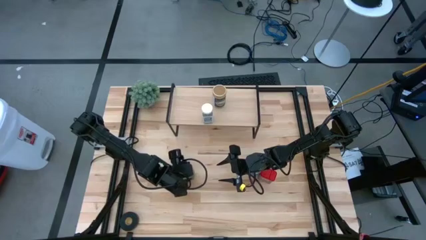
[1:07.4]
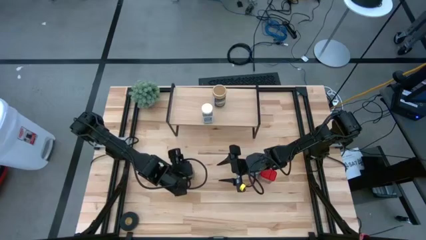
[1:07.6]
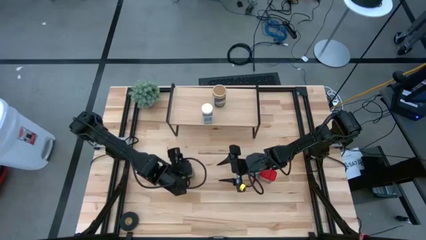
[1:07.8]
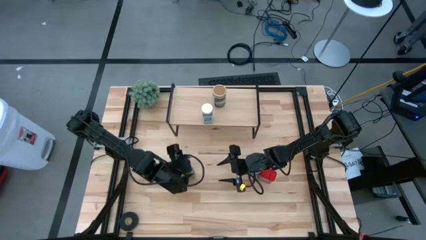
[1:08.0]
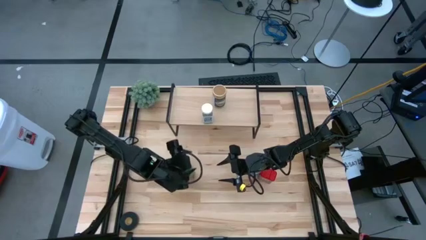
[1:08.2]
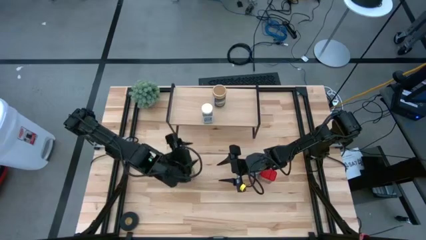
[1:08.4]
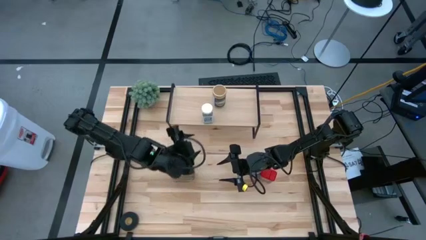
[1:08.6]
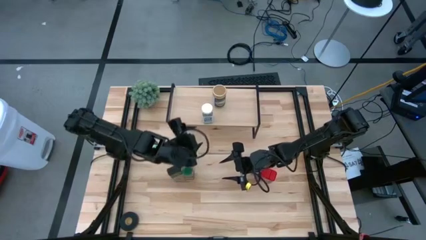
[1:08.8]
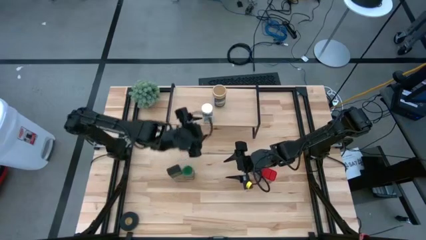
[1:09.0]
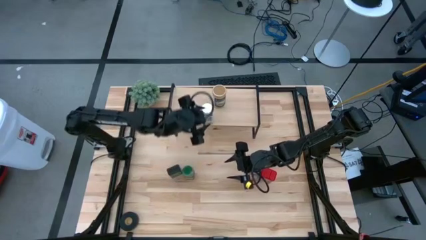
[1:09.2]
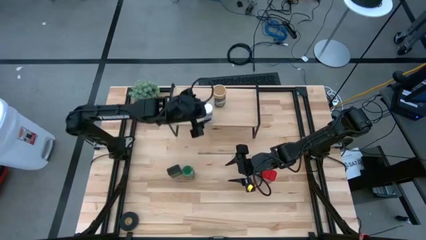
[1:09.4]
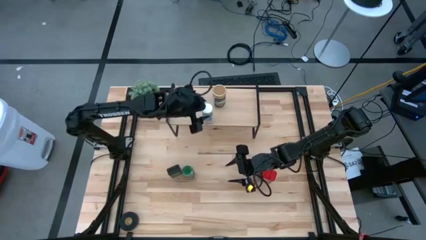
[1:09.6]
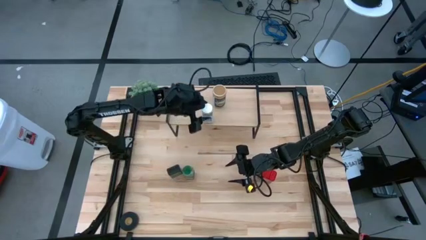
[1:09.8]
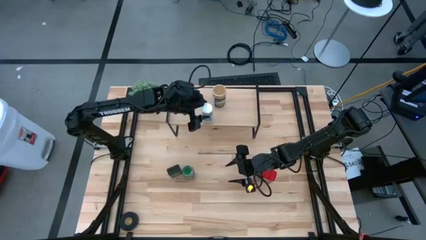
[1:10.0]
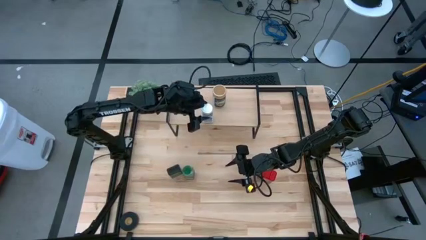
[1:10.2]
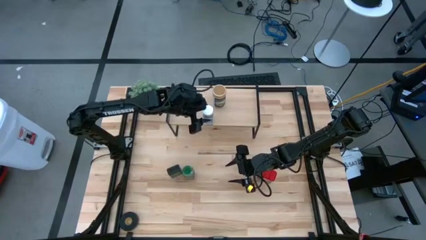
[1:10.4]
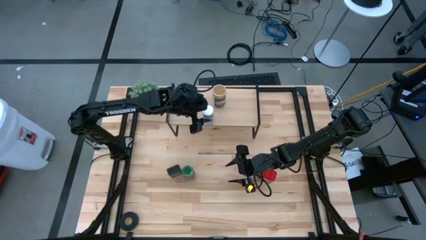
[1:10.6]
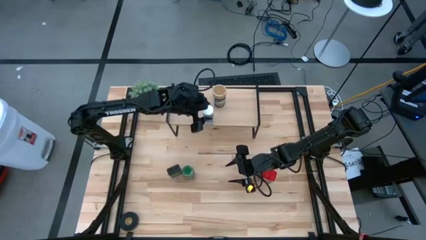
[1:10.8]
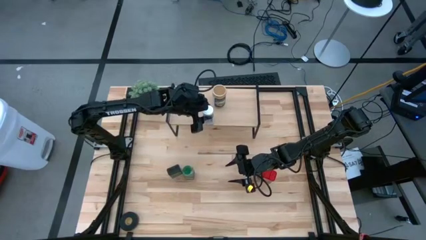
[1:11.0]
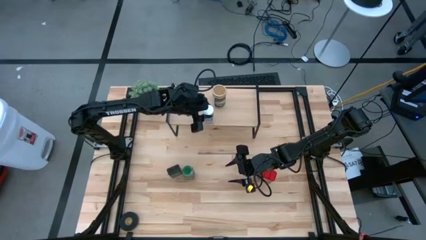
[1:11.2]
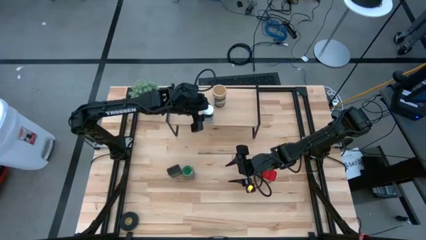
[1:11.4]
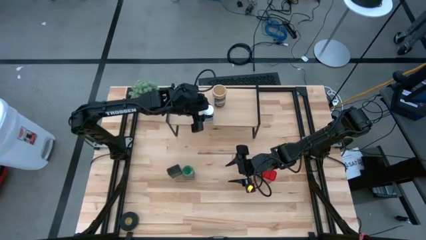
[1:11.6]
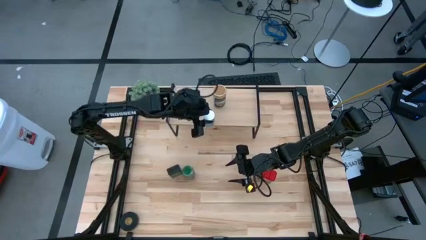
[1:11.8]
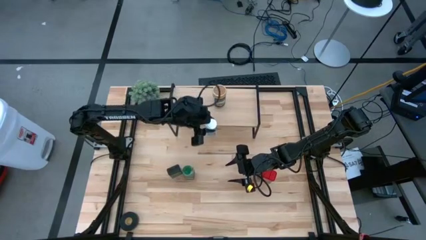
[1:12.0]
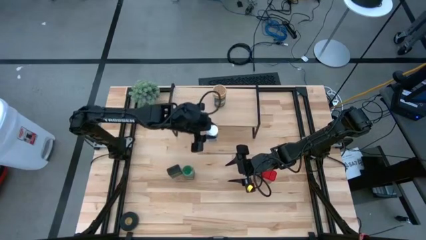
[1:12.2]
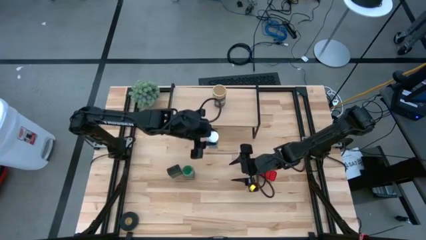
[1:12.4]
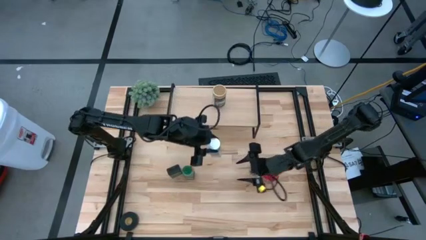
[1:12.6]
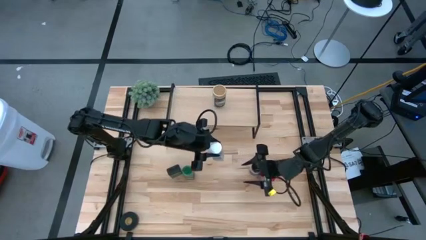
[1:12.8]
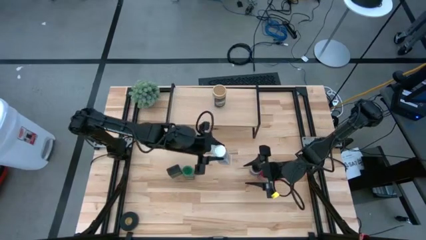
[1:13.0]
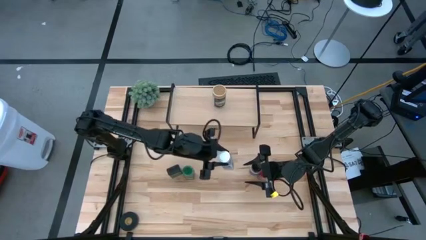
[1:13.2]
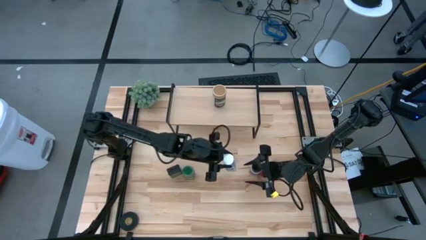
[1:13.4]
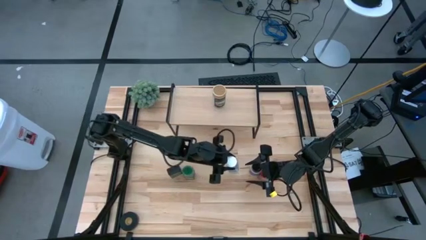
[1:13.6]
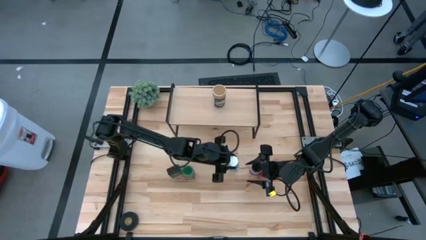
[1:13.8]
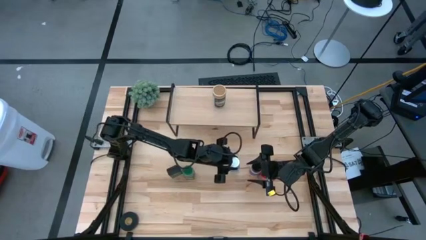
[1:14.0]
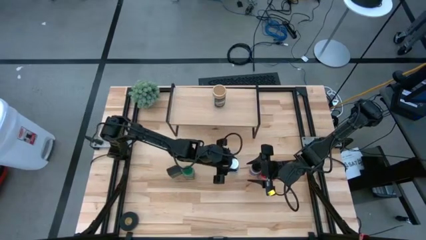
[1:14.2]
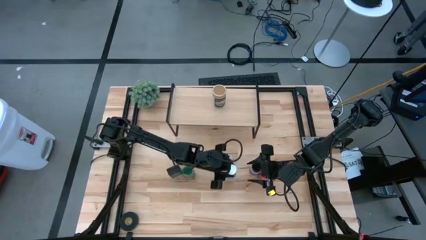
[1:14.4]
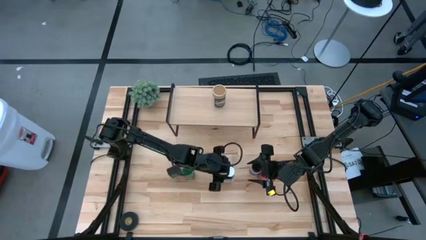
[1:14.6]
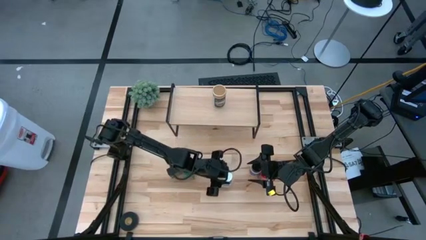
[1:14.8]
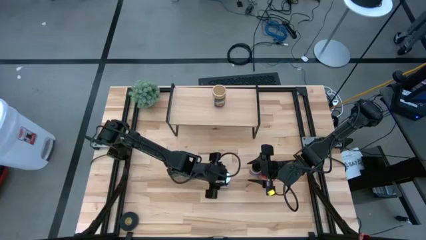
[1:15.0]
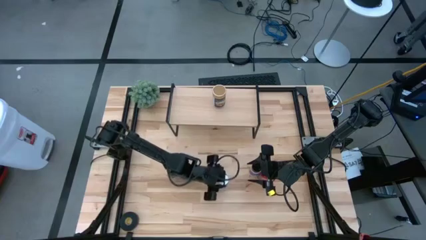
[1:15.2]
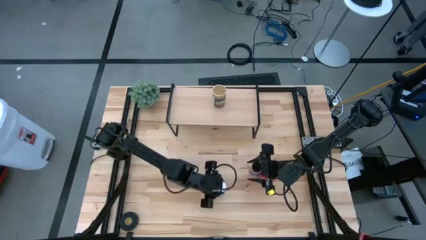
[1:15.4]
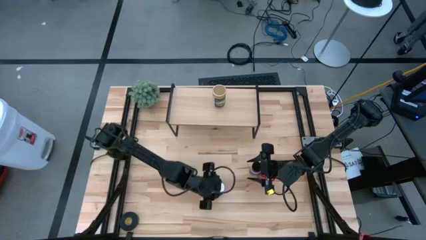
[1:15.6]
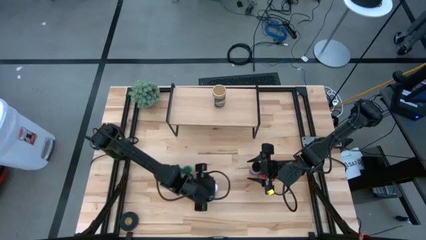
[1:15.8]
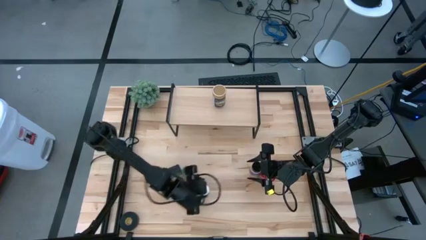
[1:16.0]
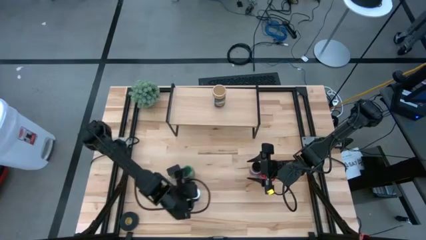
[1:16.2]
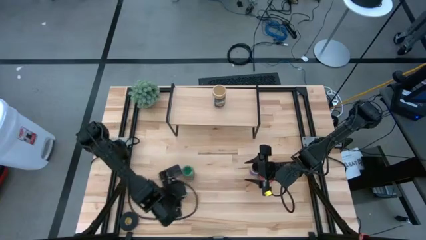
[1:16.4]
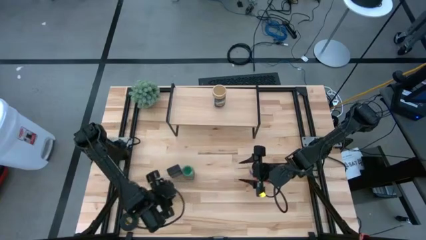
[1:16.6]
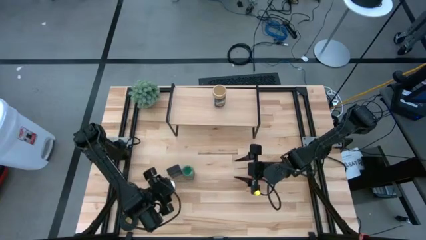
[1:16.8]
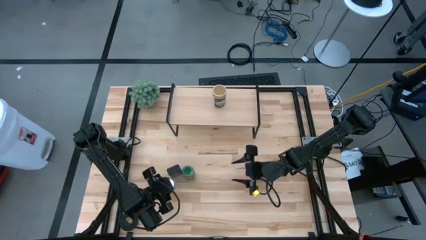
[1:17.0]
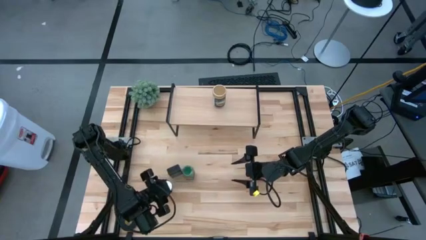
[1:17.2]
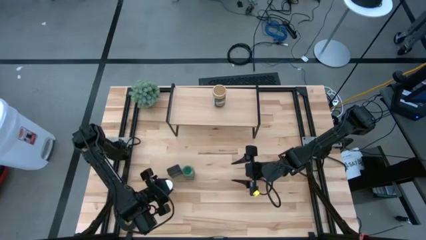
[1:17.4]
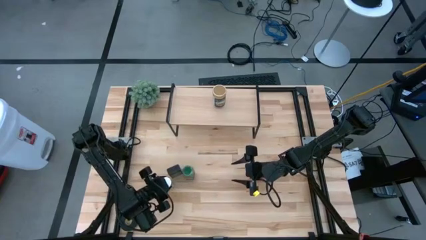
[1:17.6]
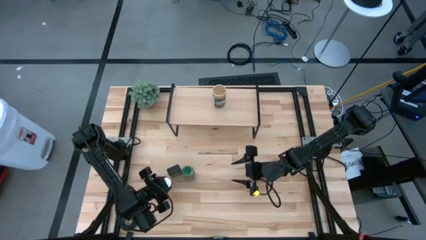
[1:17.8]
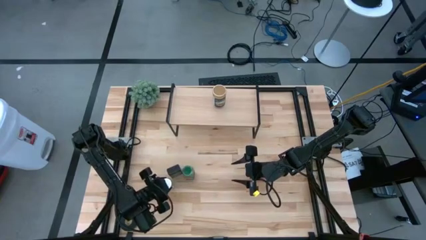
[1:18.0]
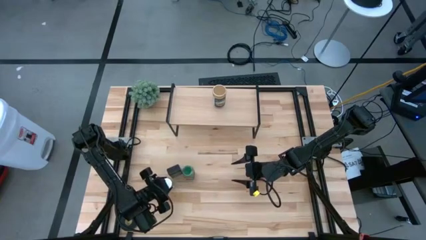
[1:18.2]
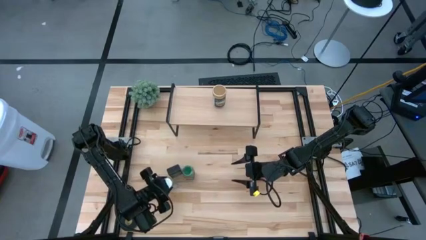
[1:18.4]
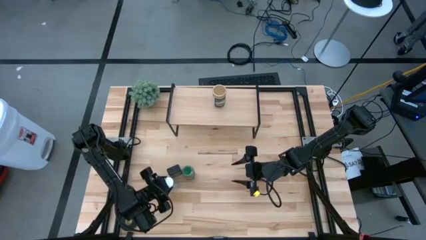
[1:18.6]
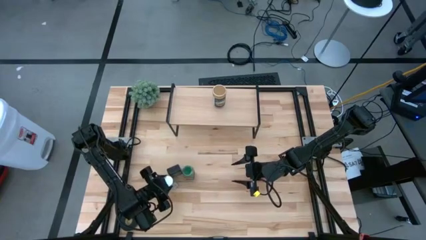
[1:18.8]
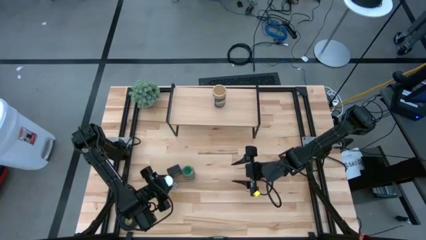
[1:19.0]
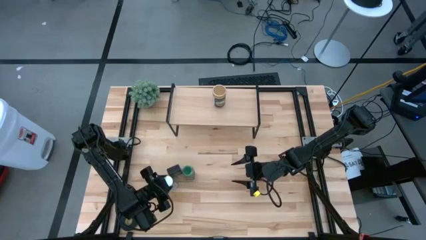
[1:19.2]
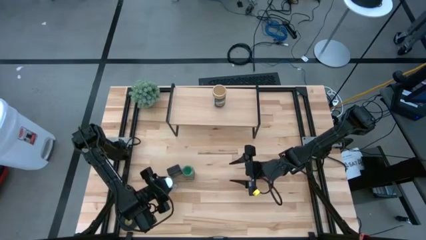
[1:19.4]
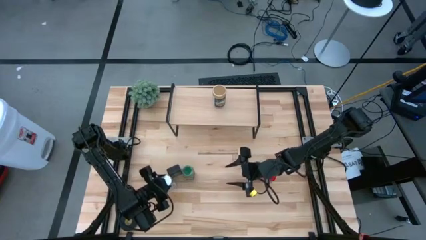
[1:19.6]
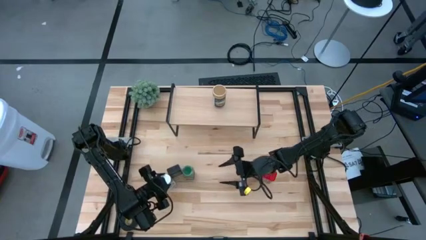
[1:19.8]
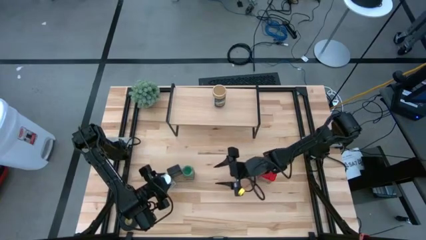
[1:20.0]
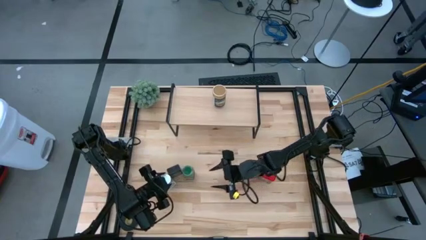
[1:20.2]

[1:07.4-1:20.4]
Task: Shelf spices
Remove the white seasoning bottle from the shelf

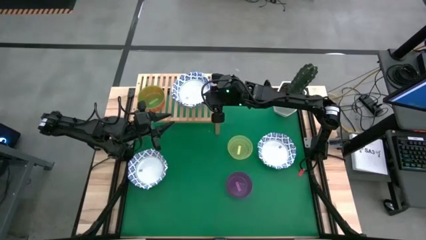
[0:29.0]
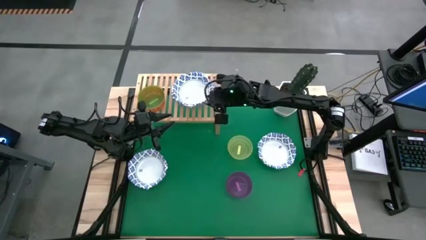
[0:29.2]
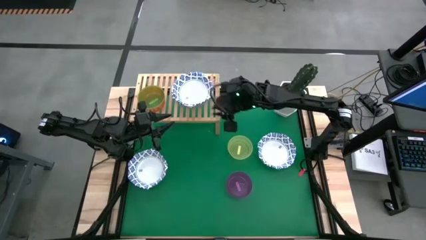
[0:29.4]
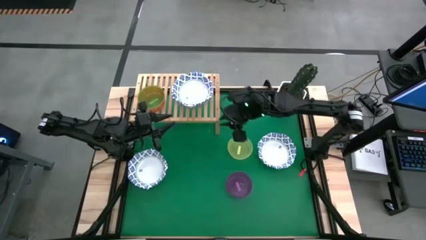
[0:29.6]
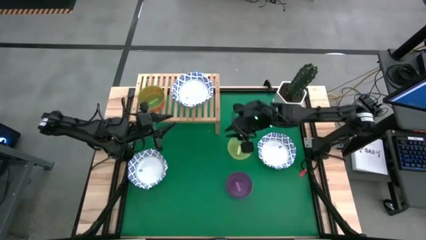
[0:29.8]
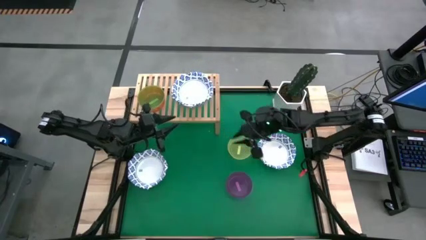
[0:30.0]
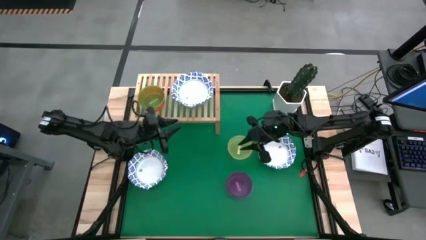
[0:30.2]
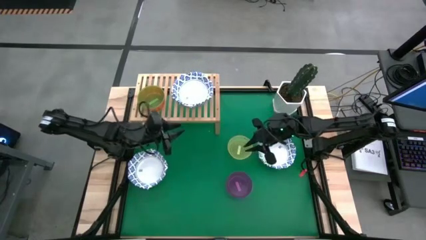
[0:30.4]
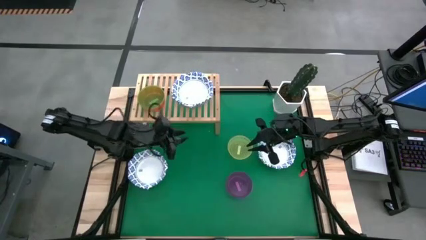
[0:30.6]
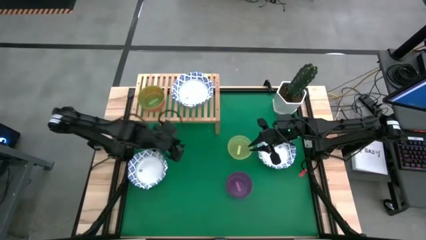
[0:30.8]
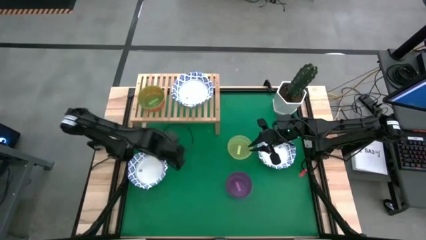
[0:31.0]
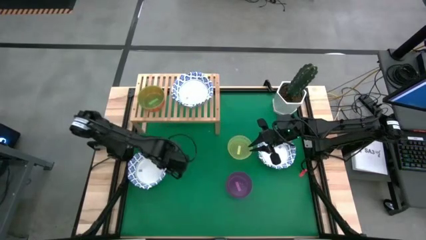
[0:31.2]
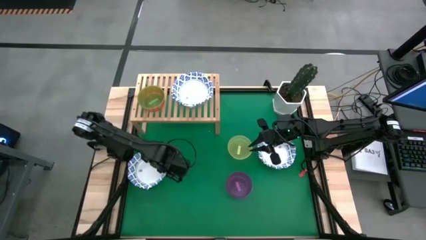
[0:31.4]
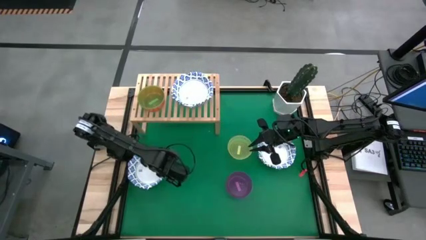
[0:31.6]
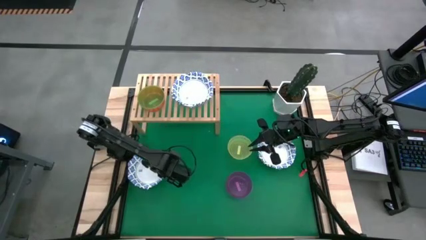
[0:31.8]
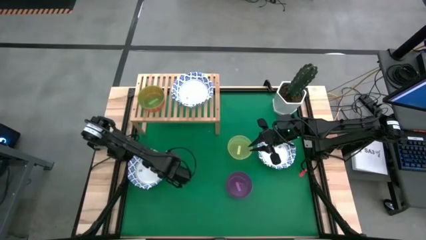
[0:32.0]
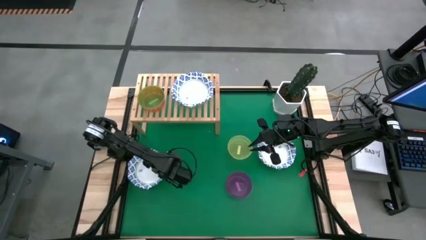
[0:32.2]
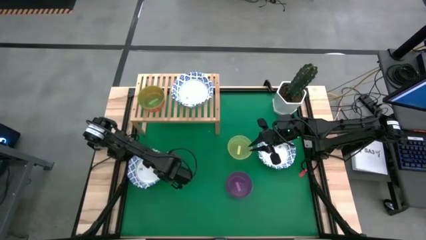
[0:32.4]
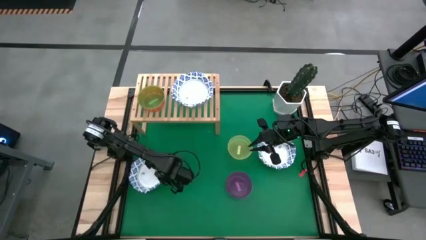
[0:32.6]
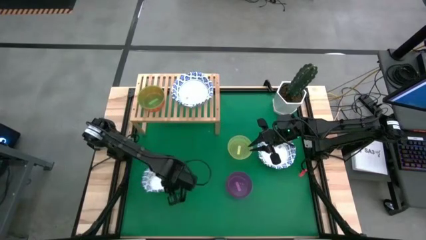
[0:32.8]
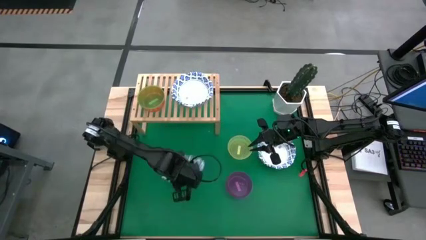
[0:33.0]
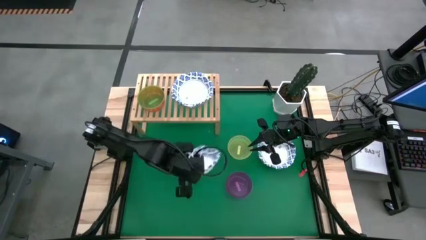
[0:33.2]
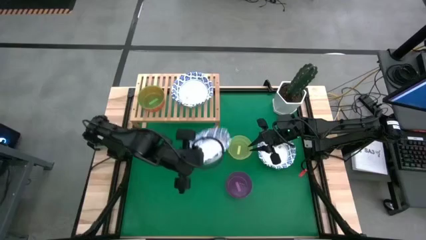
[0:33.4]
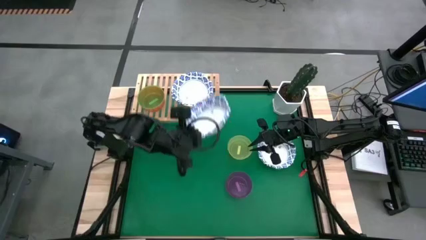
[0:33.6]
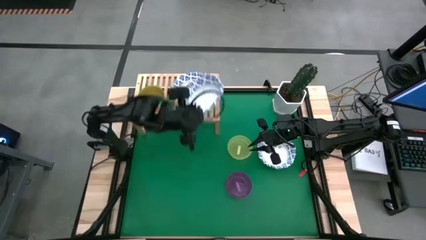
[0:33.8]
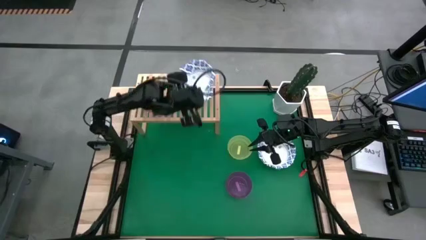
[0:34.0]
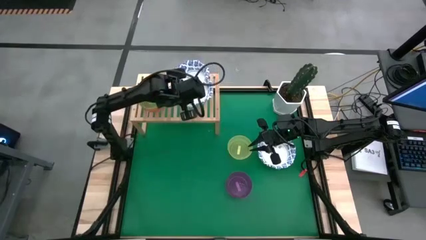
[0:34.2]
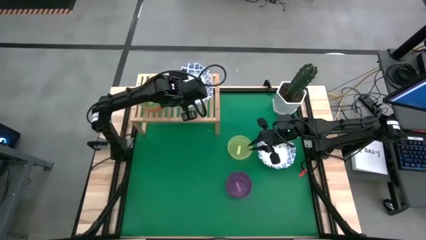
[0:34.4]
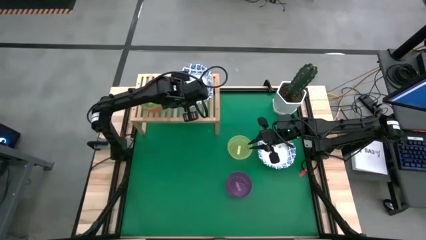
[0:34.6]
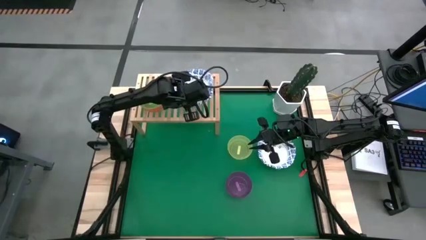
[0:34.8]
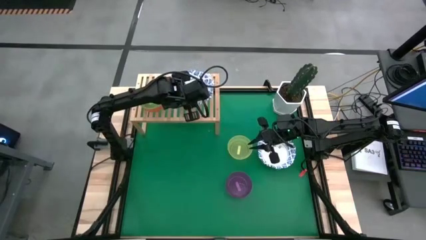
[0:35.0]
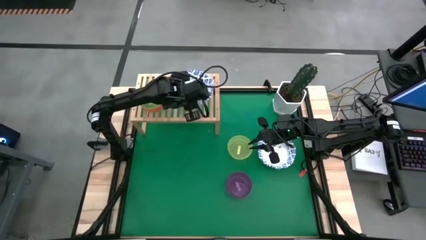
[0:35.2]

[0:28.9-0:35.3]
Task: Place and stack bowls onto a shelf
Stack the blue patterned bowl on top of another blue patterned bowl on the shelf
